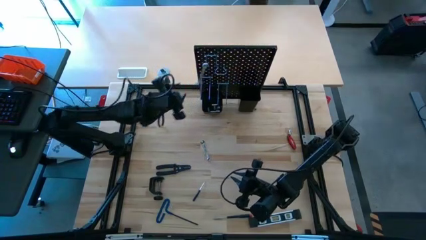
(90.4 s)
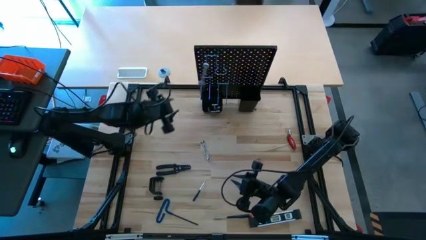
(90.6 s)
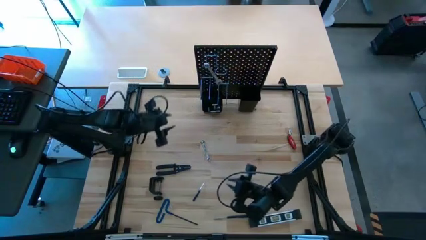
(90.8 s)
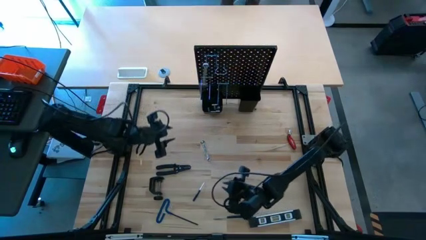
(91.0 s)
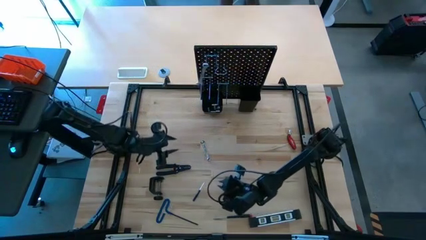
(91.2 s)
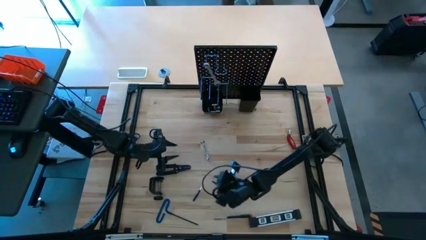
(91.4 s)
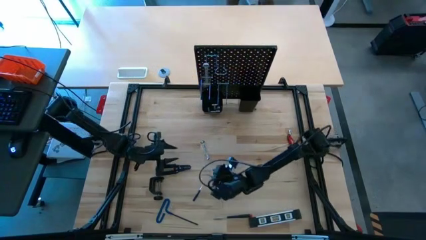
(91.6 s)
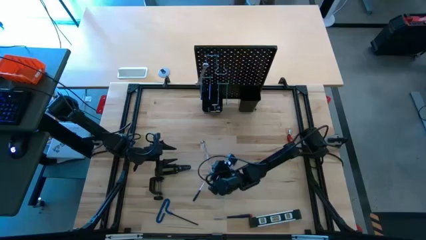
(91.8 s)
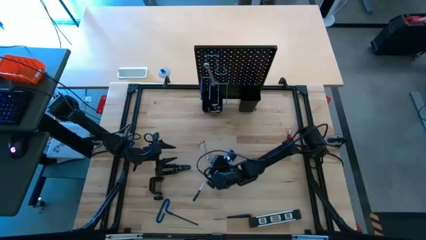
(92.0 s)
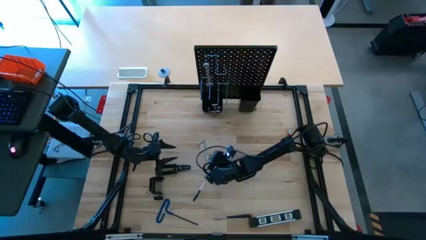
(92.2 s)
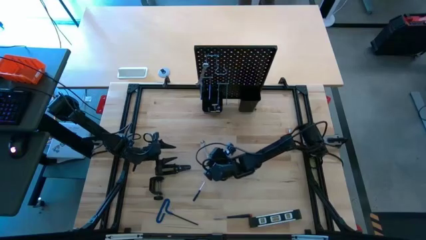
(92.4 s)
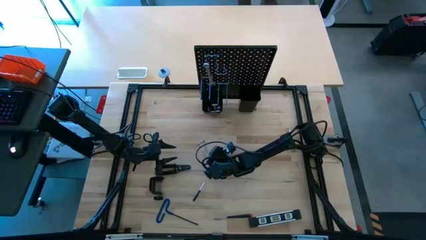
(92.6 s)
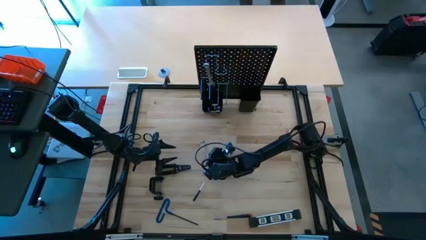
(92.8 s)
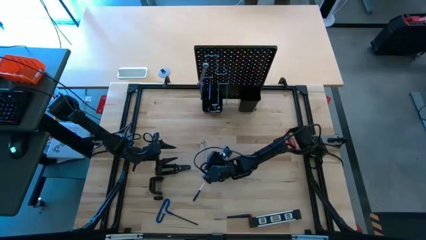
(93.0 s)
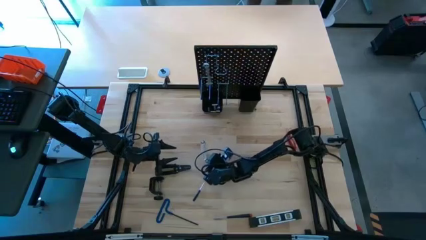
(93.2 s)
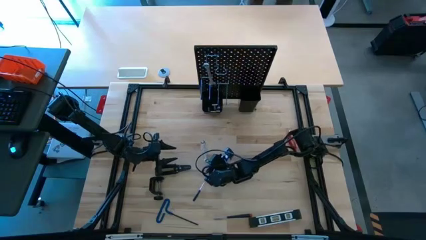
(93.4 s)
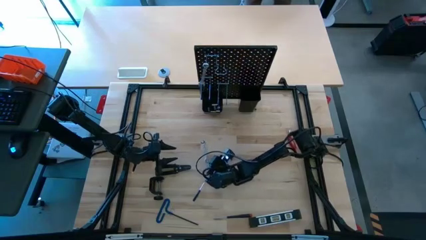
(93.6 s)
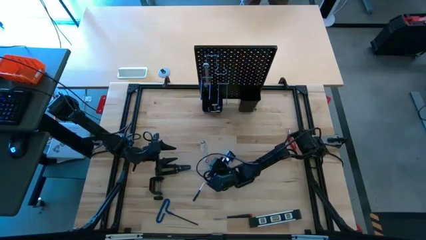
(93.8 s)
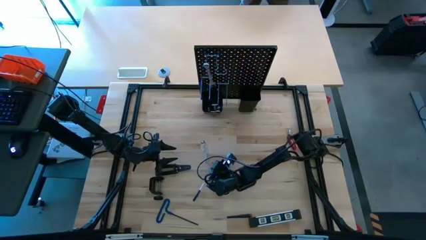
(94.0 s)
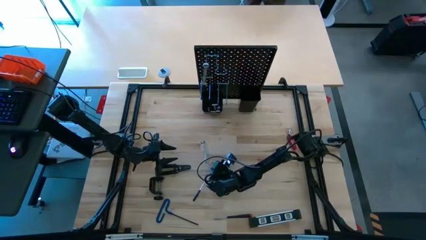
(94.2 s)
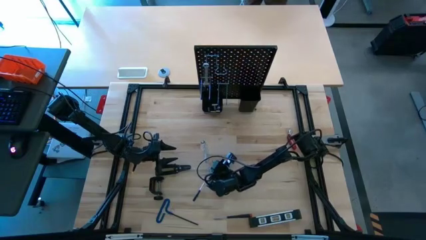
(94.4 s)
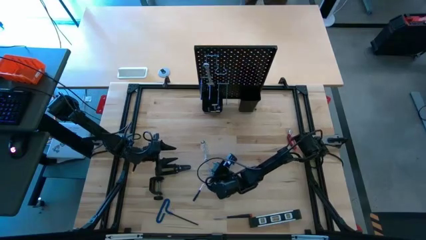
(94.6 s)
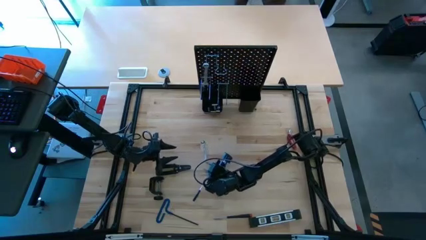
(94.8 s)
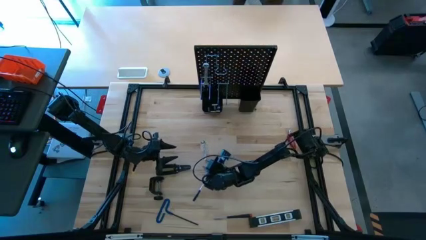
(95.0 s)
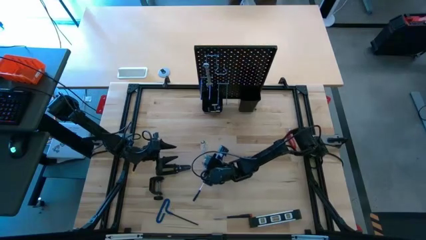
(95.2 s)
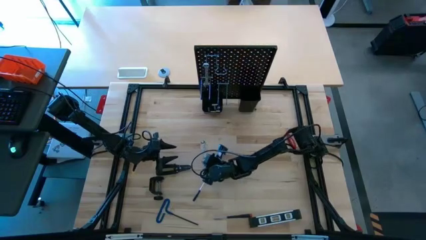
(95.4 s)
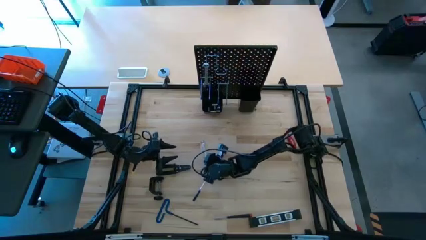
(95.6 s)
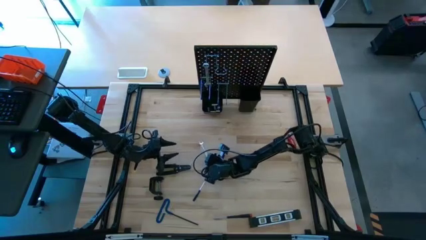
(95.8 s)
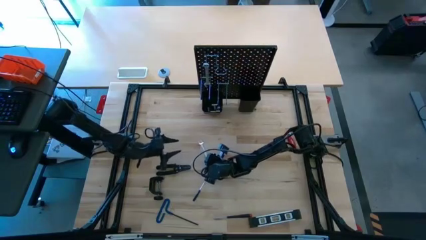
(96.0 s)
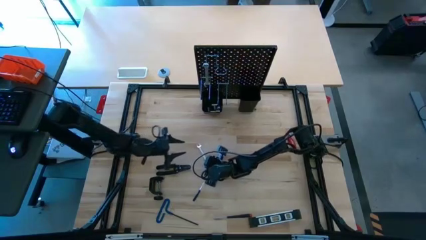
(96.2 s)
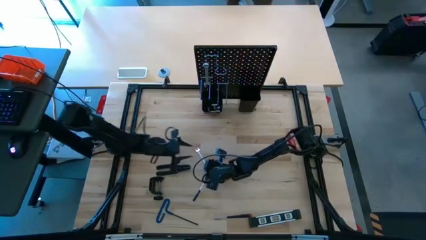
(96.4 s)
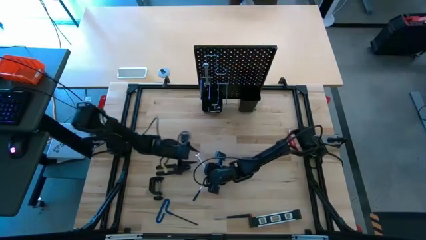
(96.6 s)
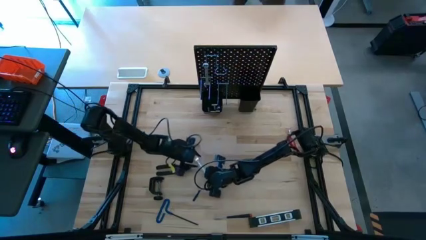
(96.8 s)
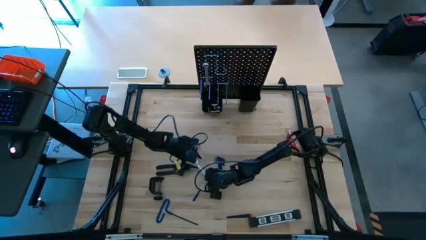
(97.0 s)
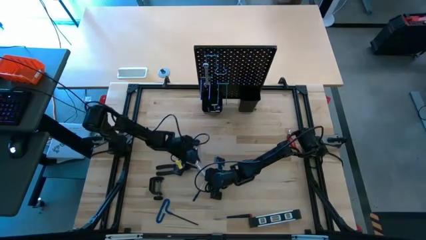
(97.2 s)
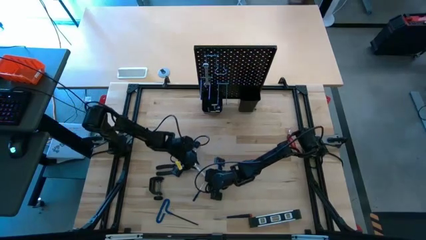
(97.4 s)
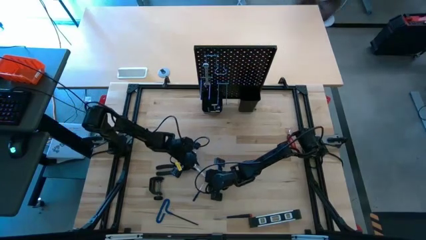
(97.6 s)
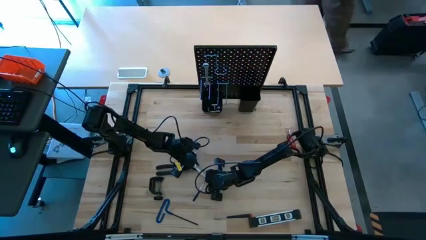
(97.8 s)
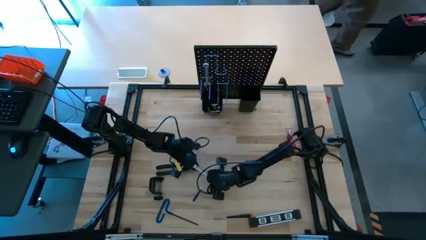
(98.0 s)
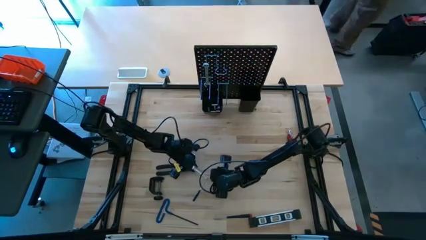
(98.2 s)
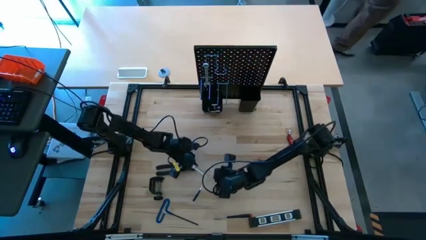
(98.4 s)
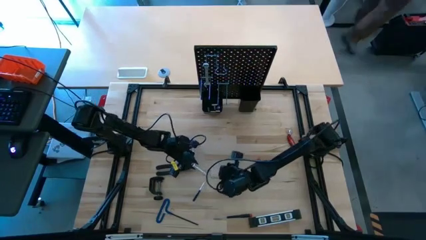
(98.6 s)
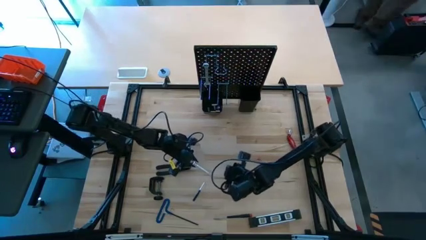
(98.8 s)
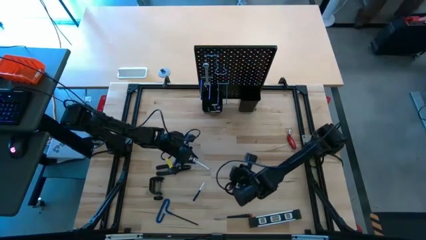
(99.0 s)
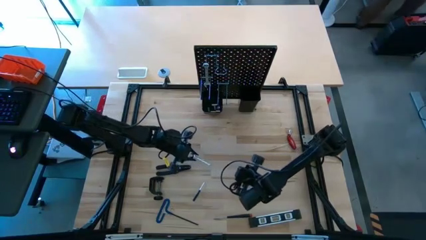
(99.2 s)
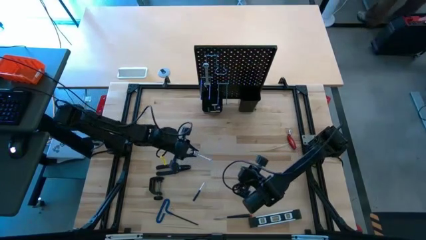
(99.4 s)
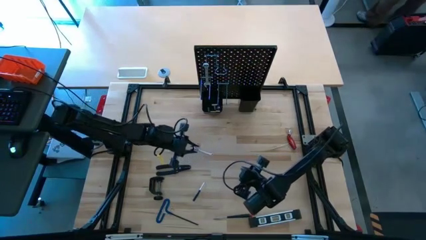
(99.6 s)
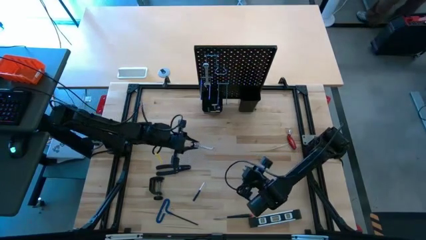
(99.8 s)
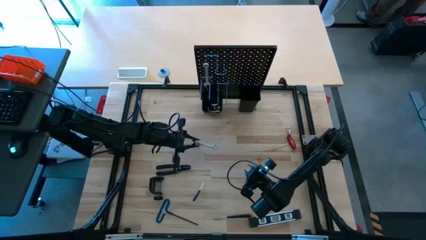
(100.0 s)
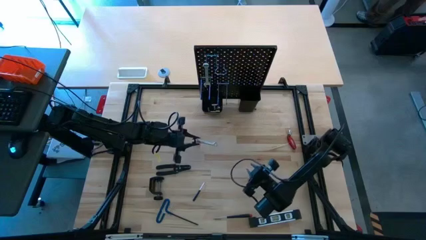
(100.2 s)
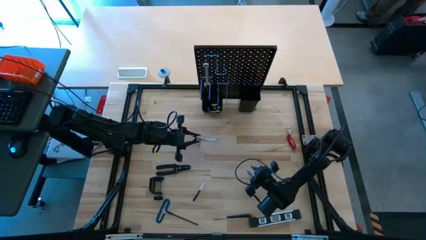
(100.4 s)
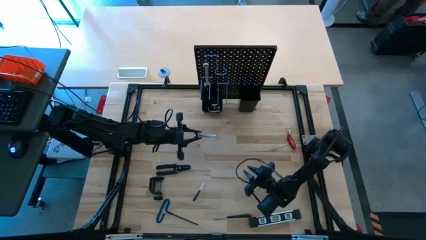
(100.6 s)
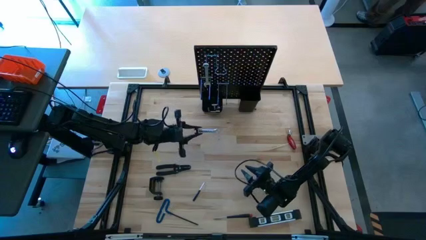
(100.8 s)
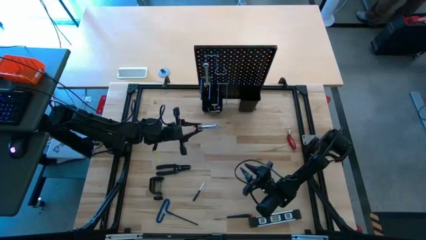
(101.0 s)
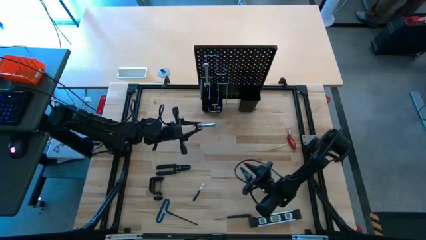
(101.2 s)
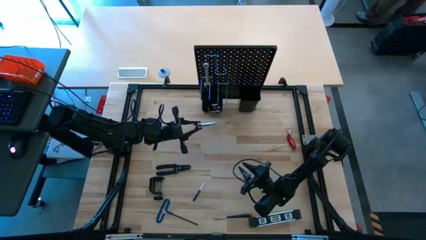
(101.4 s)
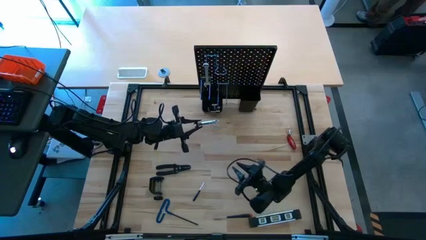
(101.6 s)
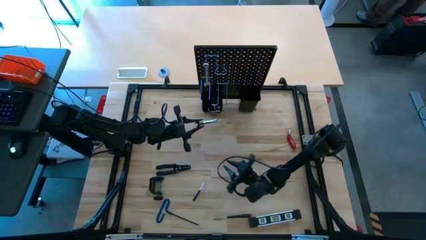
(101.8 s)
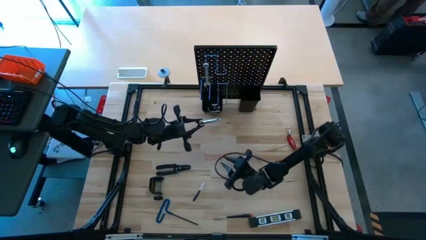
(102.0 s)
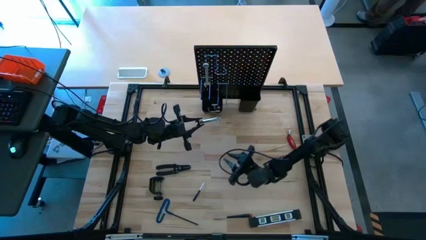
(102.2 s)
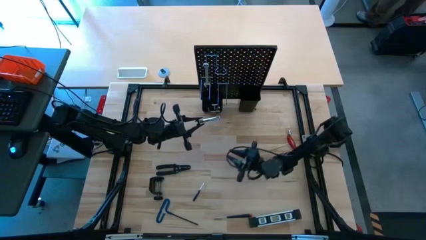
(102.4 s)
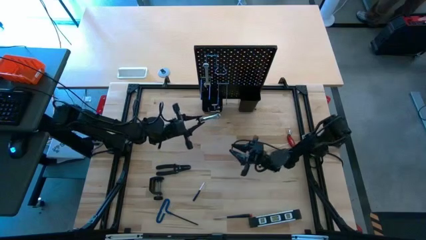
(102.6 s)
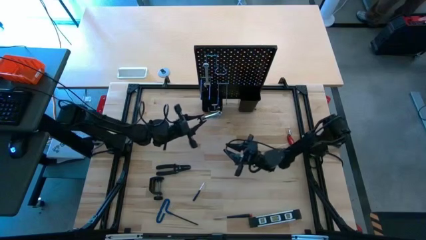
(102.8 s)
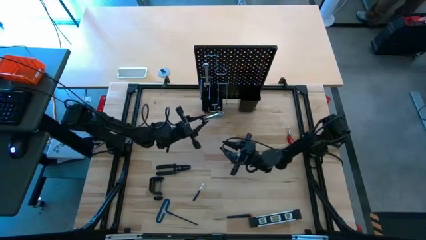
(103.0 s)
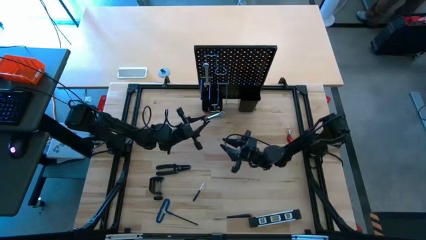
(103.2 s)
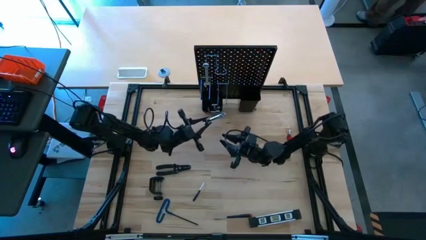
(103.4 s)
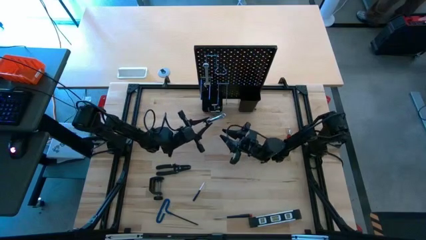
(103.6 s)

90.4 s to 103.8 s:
Task: Hang tools onto peg board
Hang the wrench onto the pegboard

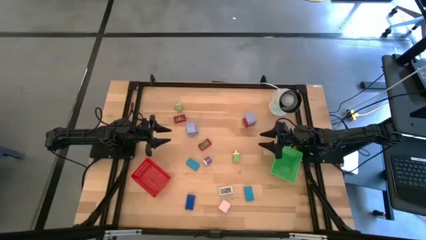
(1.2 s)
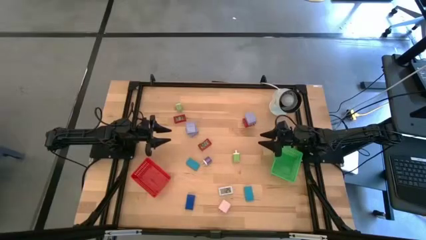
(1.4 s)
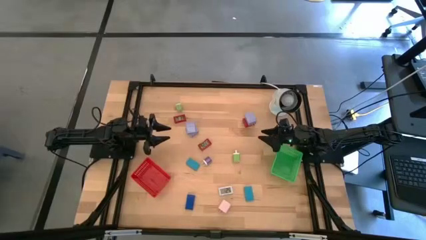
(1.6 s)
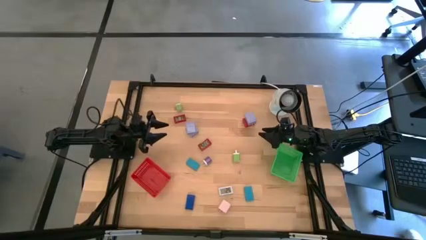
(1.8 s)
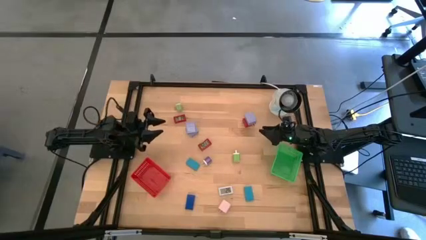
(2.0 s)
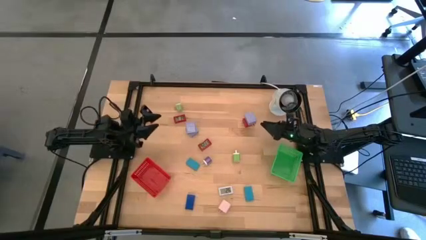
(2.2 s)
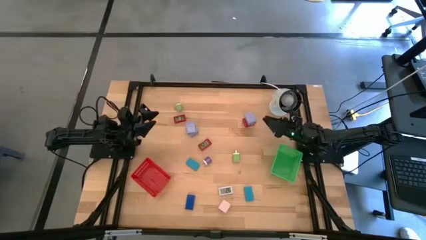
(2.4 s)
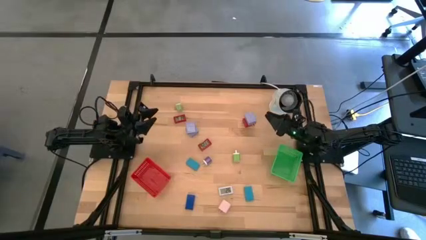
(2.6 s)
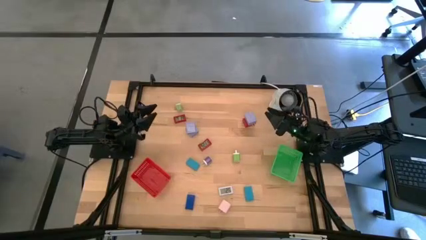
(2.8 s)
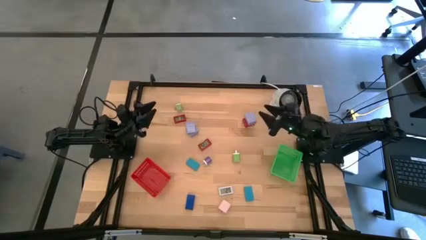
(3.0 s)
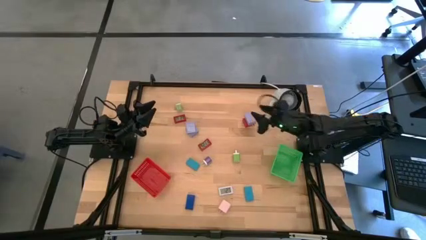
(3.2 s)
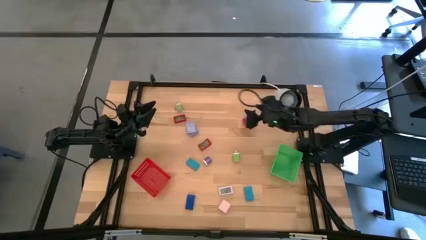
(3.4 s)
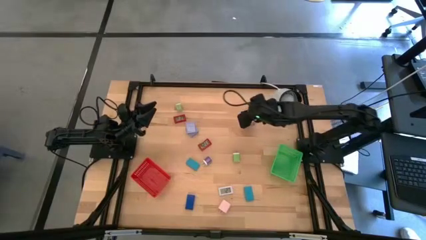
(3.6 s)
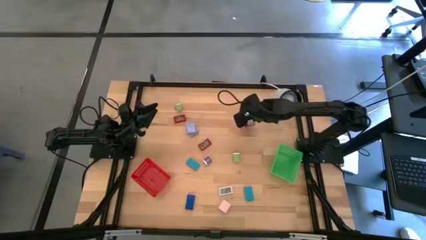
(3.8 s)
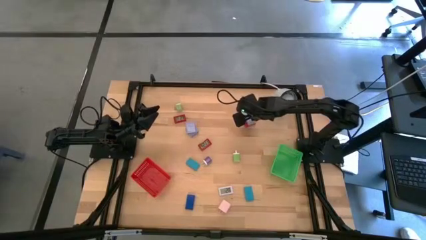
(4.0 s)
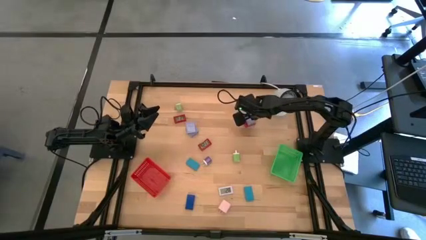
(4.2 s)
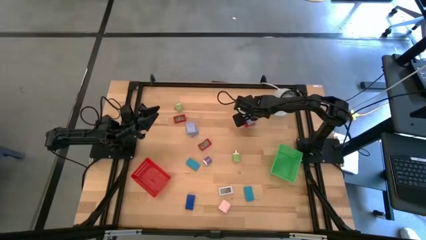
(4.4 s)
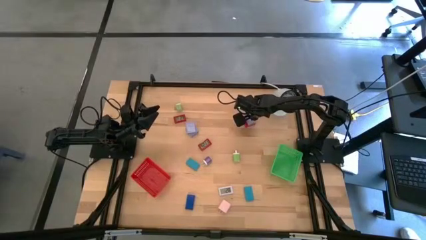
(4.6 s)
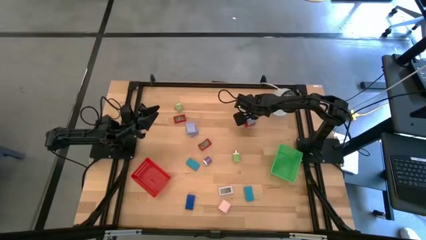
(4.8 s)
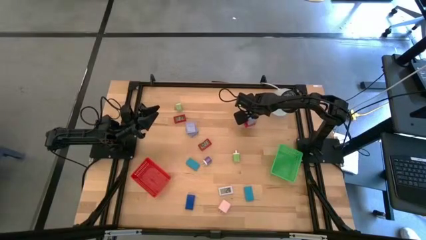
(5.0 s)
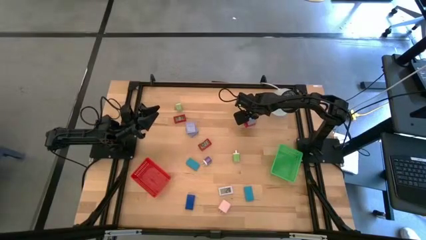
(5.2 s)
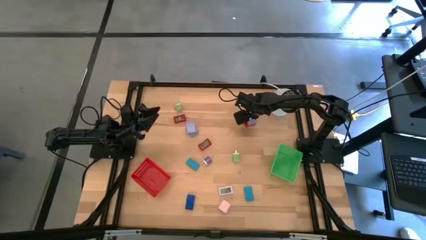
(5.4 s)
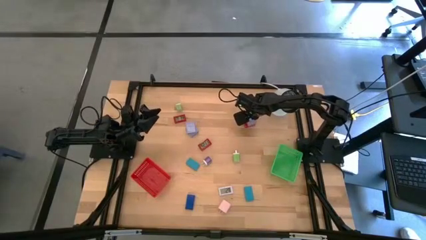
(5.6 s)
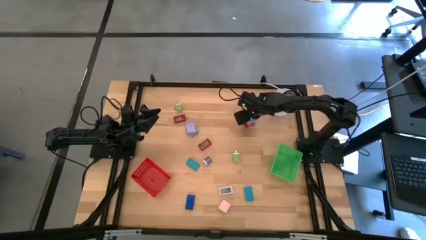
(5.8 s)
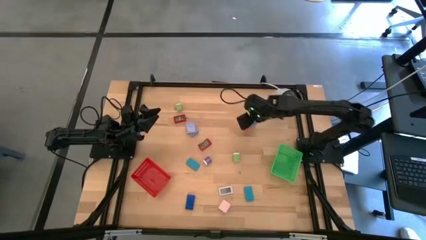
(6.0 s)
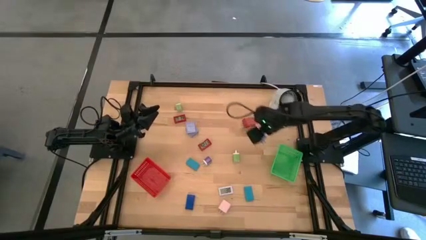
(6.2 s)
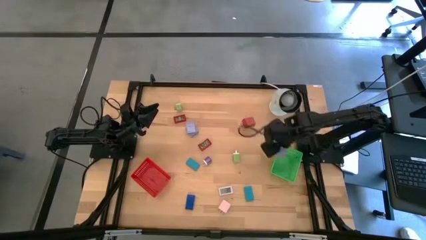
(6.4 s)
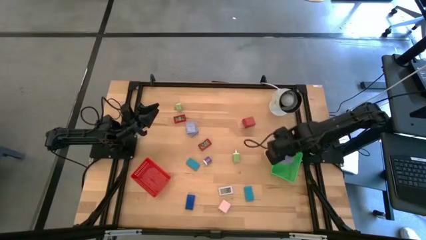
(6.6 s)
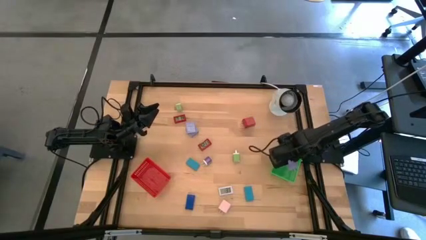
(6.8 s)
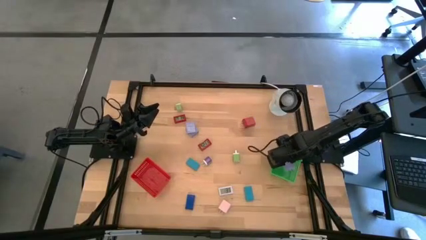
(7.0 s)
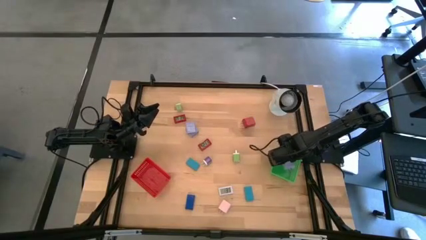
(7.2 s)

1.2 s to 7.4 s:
Task: Pick & Place Office items
Put the light blue power adapter into the green bin
